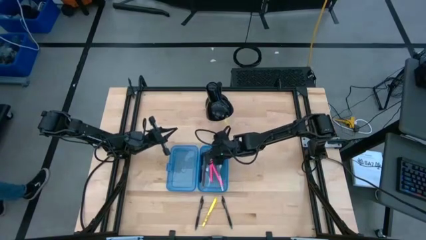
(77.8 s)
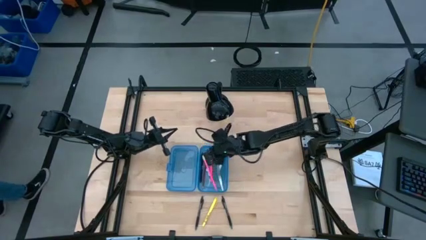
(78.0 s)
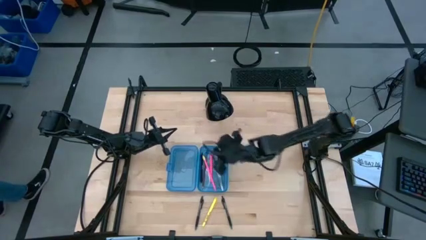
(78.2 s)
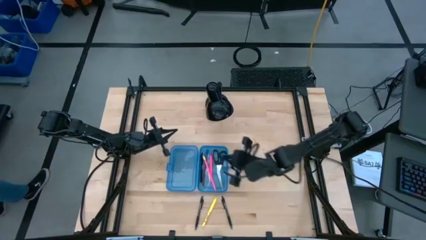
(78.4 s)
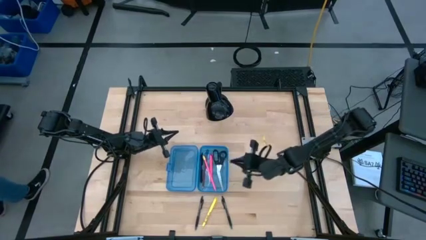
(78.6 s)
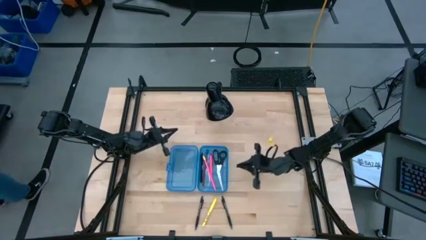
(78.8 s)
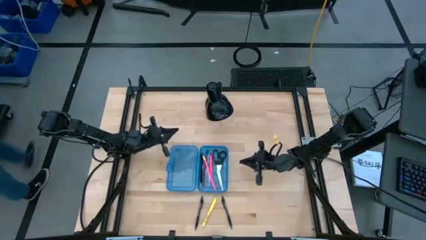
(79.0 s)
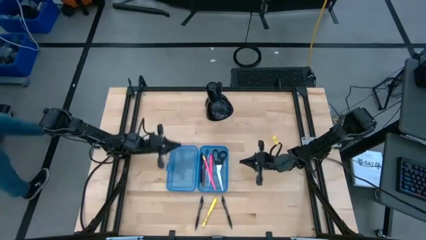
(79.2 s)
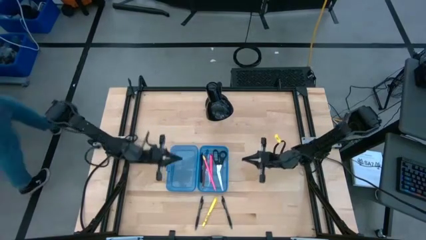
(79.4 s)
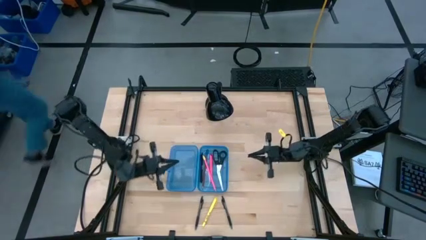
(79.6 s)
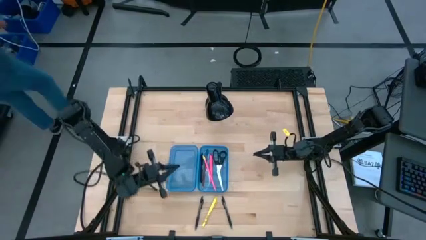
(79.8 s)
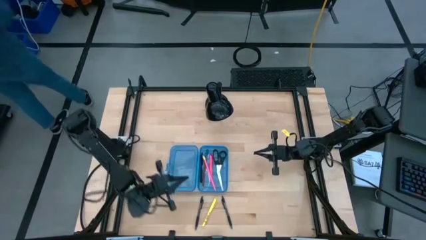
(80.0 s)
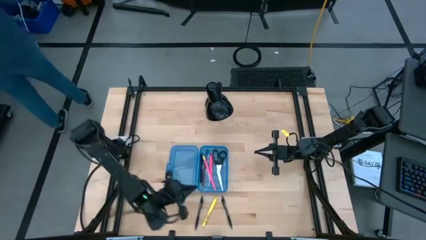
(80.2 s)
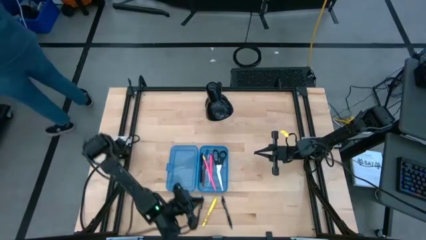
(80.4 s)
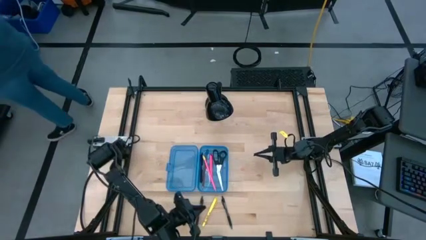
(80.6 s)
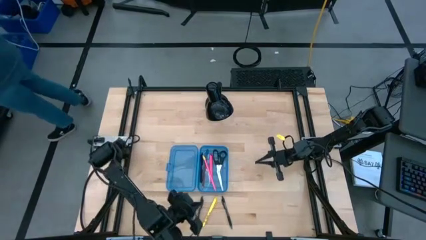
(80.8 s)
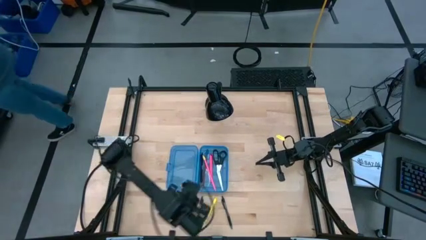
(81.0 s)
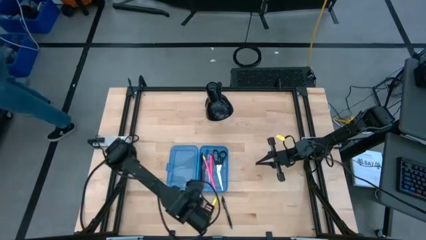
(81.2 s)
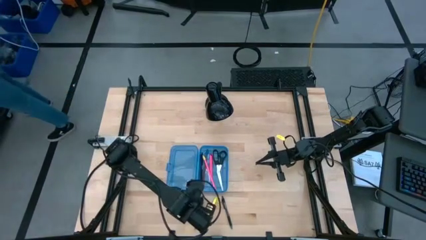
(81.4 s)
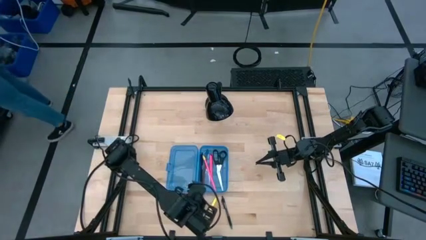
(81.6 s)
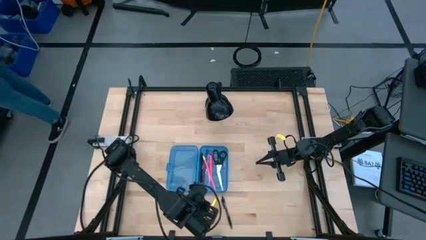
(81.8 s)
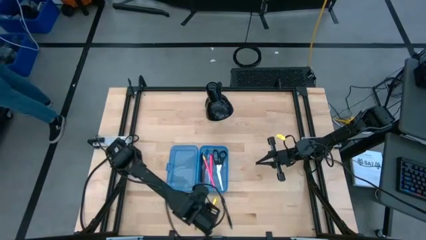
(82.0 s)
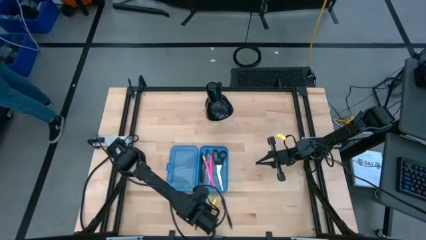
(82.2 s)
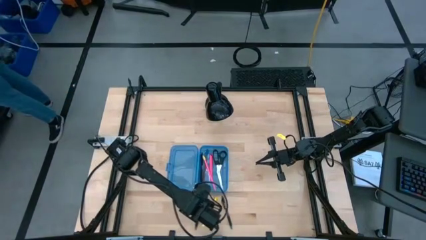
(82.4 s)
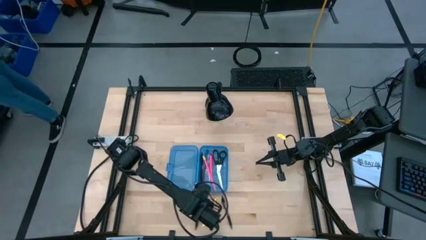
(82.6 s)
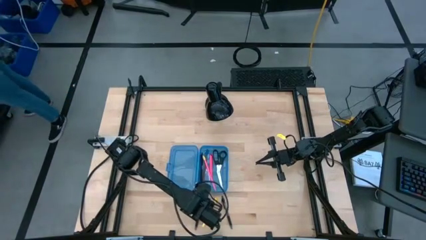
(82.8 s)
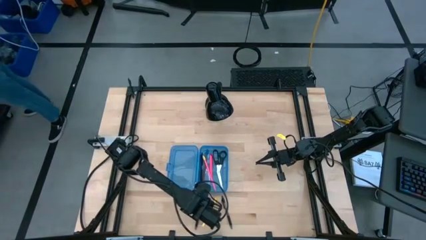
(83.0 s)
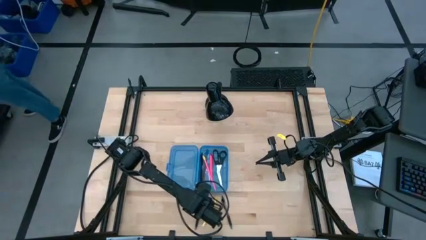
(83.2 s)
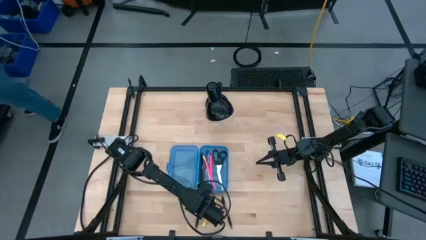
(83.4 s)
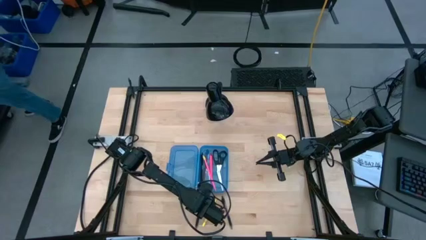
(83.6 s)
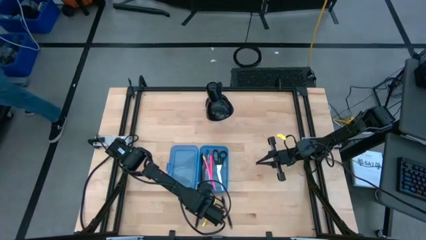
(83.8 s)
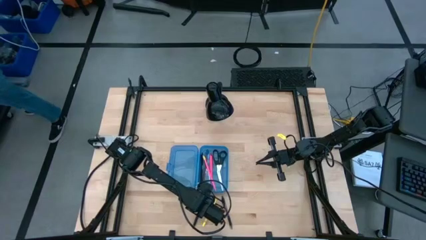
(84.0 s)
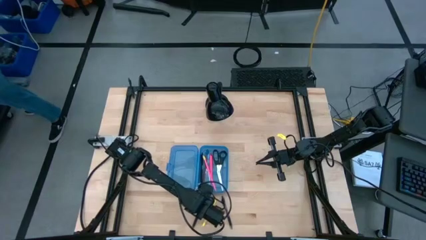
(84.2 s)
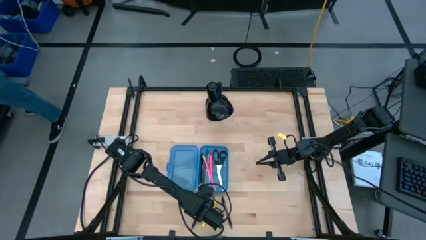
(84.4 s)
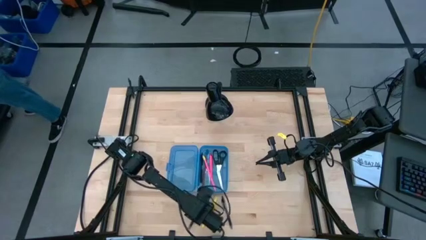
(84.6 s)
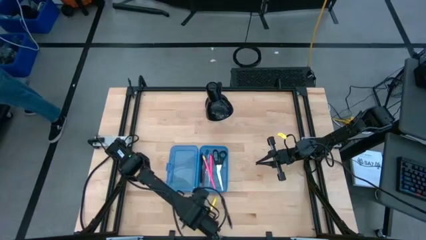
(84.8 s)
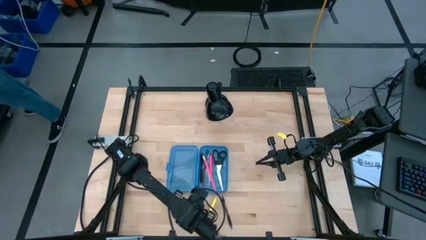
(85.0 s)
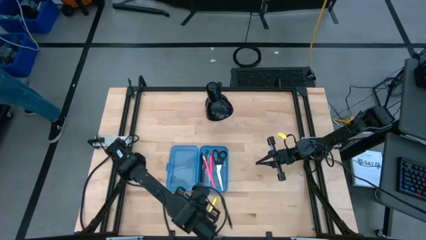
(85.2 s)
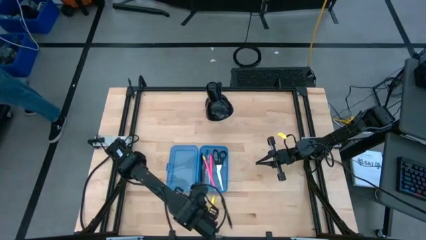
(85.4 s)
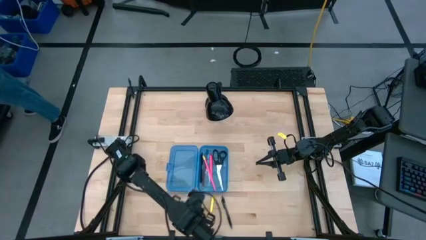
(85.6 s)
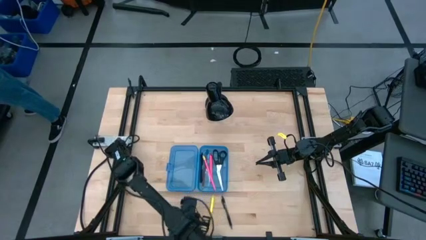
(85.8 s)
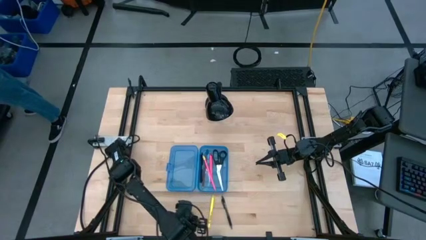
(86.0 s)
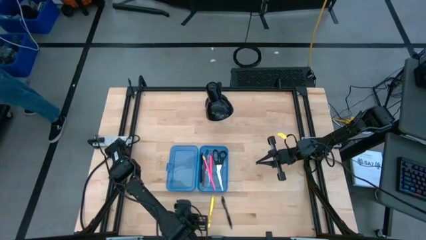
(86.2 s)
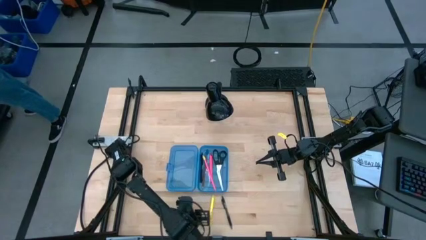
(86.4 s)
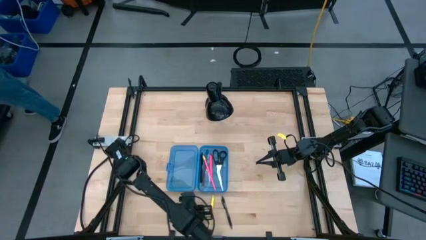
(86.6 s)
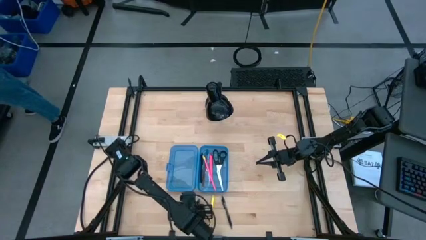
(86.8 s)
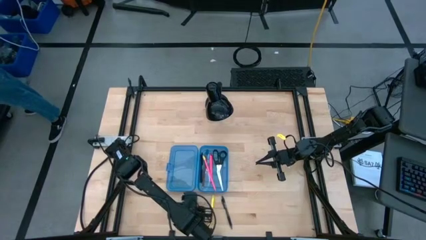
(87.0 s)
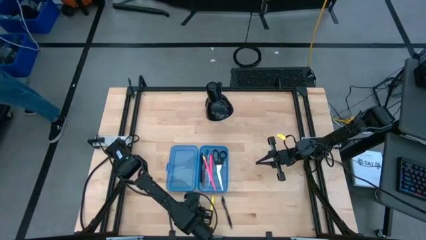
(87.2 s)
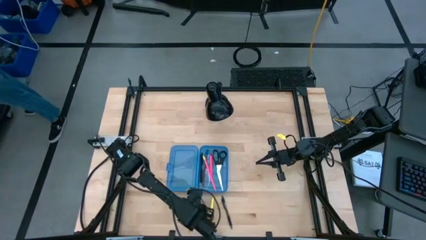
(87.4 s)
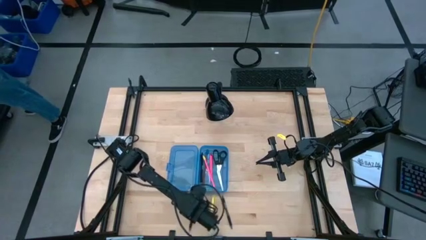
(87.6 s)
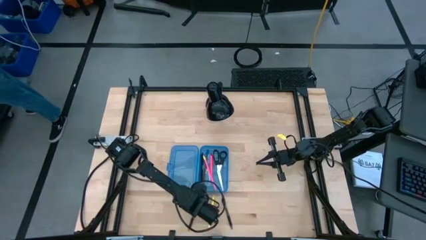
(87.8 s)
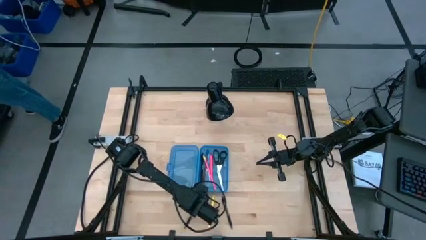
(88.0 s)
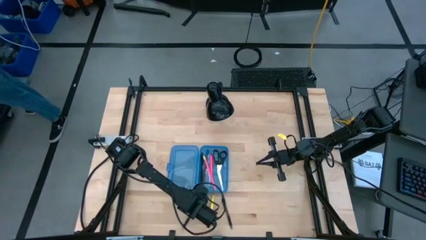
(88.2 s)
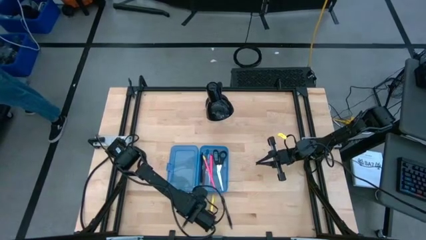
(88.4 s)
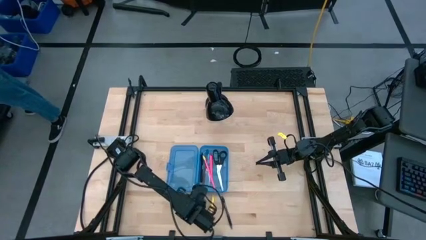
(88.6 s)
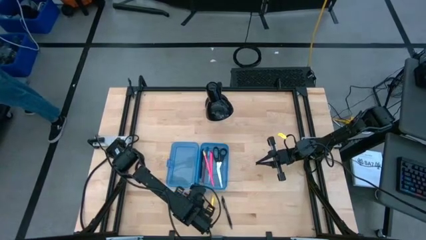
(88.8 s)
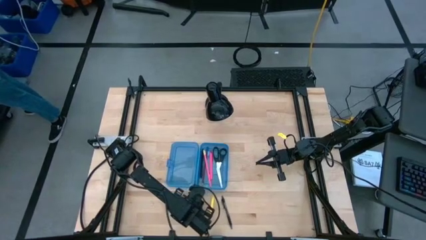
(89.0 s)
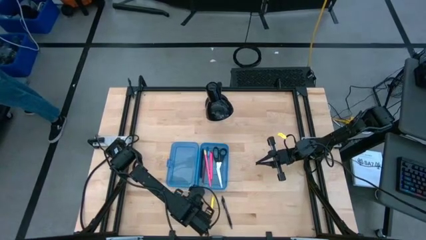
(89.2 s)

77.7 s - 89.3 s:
Task: Pick & place school supplies into a supply box
Put the left black pen into the blue supply box

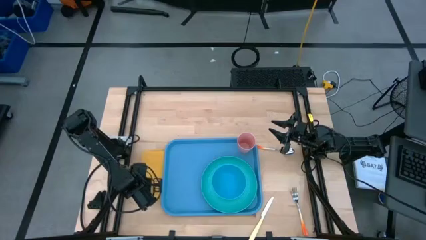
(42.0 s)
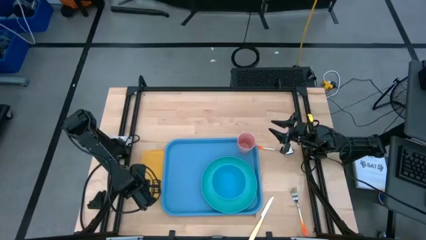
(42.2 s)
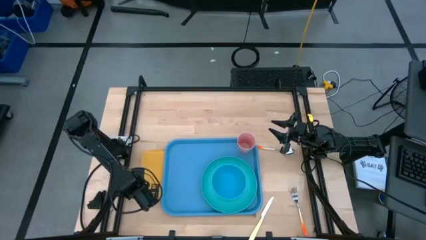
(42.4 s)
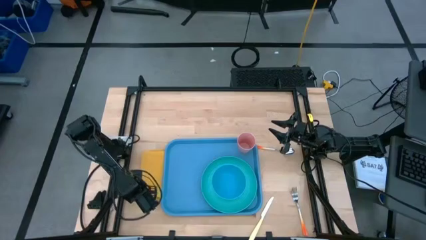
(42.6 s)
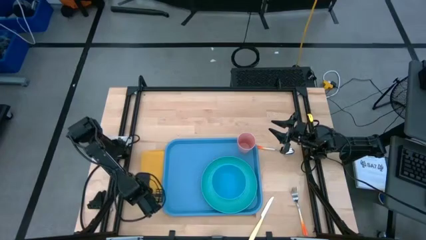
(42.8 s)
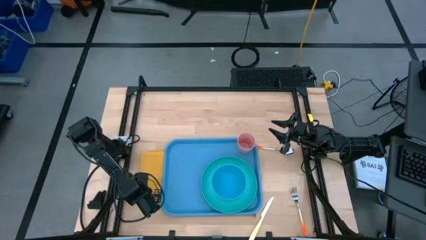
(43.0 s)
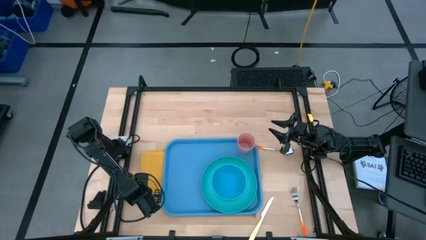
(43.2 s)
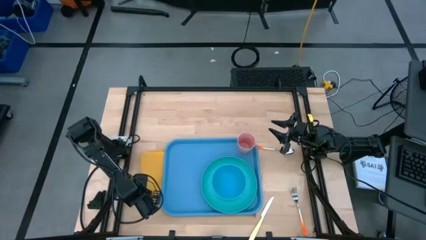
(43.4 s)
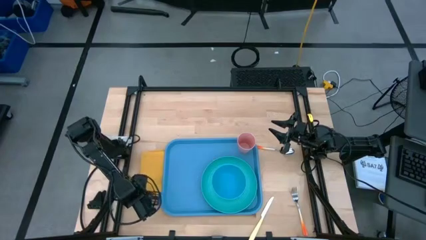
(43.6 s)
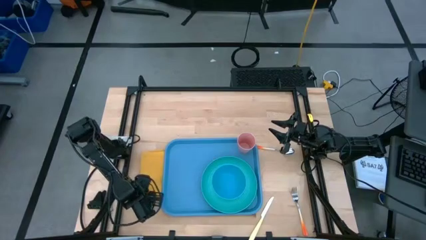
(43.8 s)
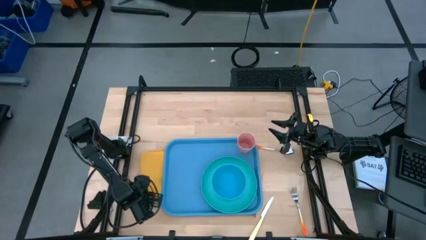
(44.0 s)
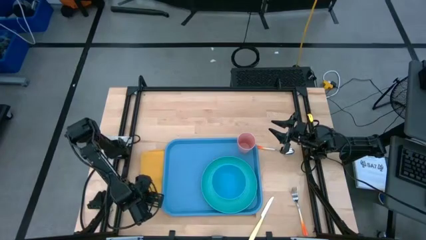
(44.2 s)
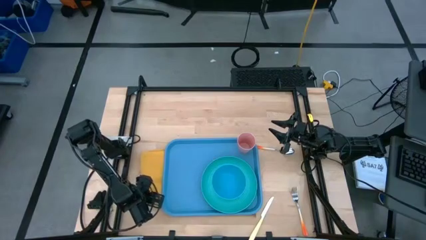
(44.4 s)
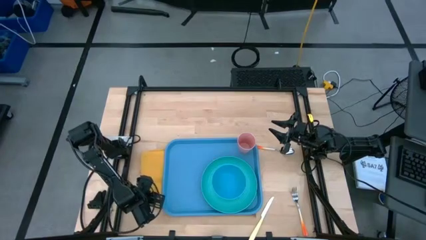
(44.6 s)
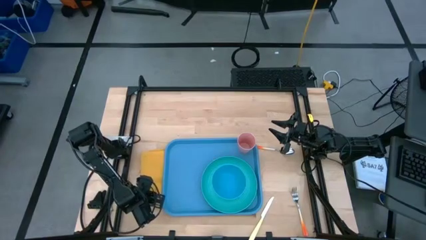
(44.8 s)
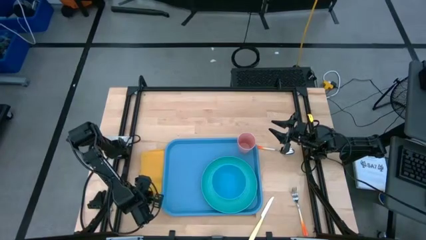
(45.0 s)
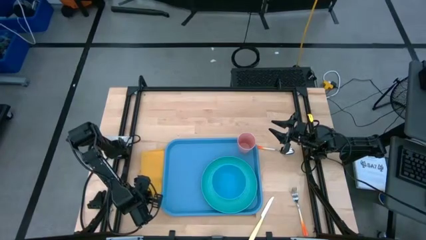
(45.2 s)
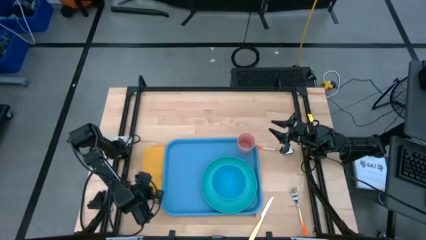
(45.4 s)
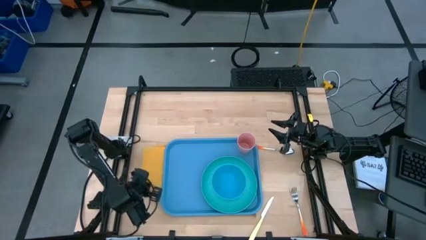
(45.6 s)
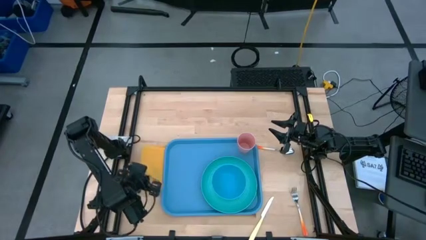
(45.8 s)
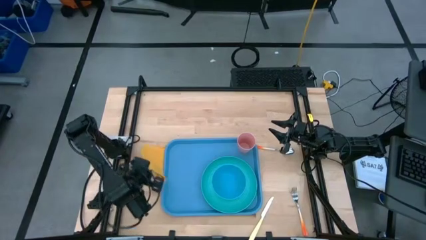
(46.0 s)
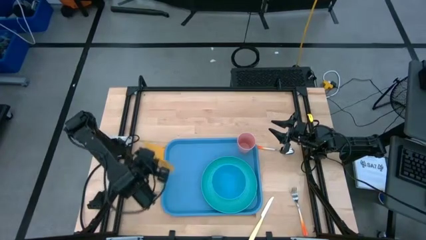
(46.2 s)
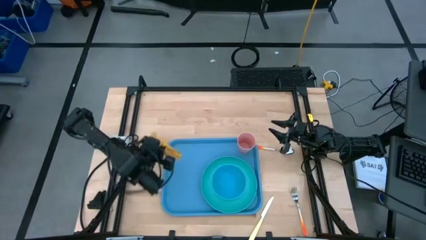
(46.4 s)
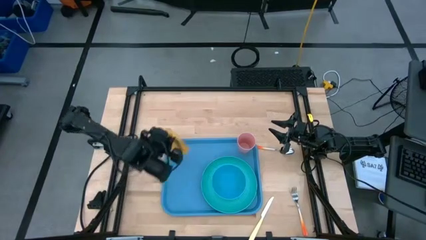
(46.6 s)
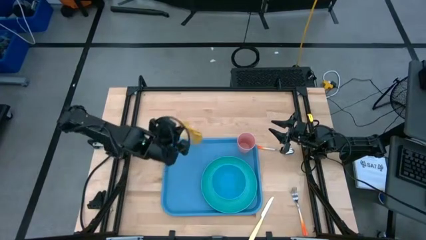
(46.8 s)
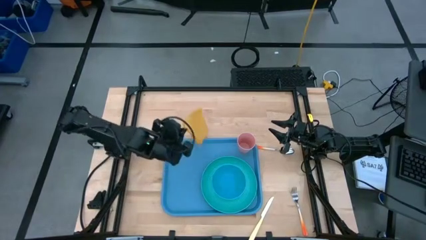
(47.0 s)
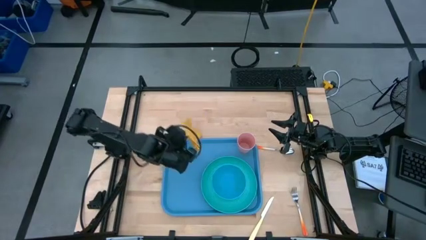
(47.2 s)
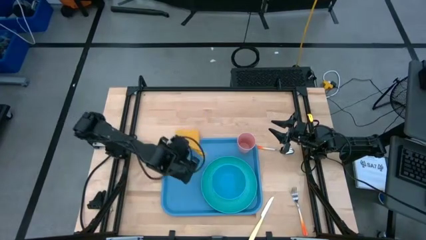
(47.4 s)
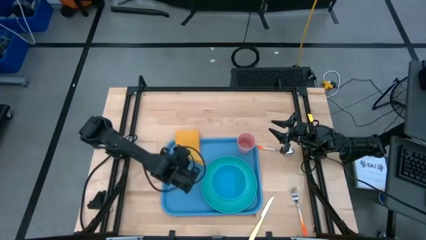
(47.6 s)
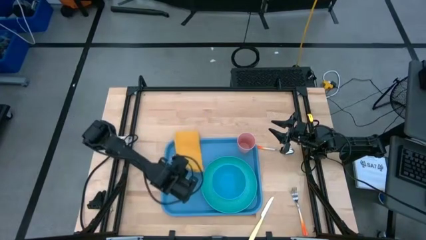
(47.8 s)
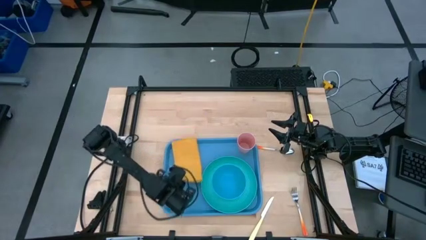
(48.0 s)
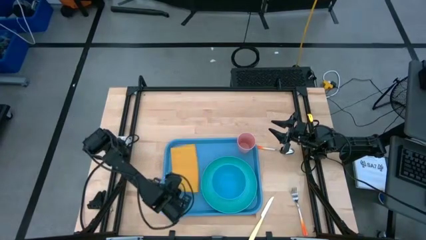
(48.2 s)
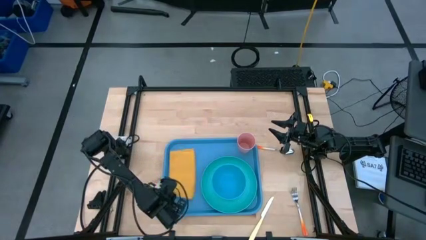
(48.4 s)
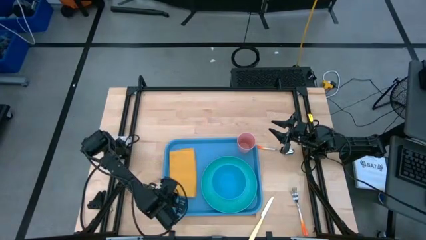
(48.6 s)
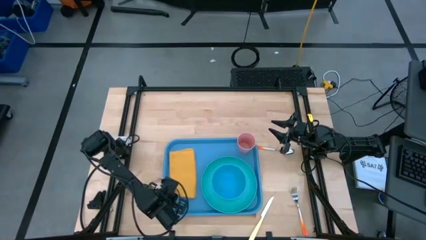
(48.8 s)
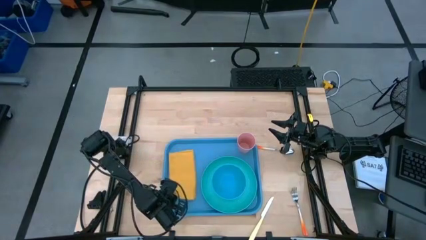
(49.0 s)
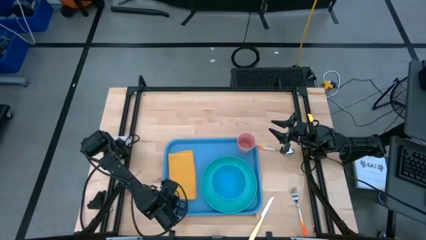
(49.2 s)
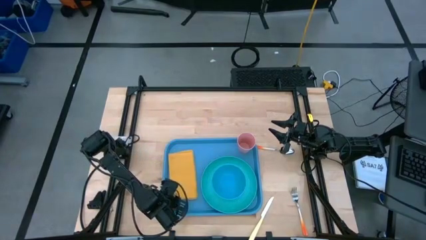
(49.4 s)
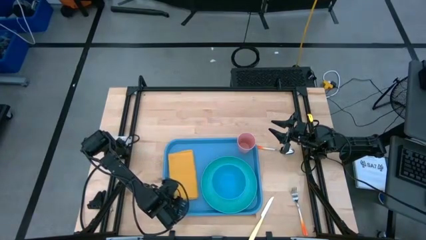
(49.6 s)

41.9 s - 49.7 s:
Task: Set up tray
Put the yellow napkin on the blue serving tray to the left of the blue plate
